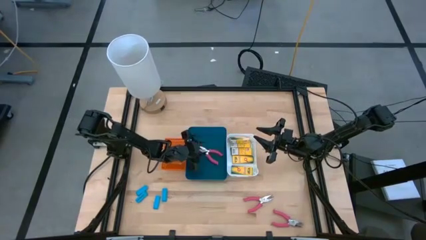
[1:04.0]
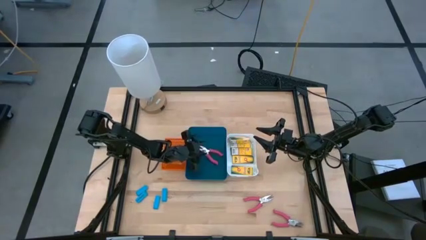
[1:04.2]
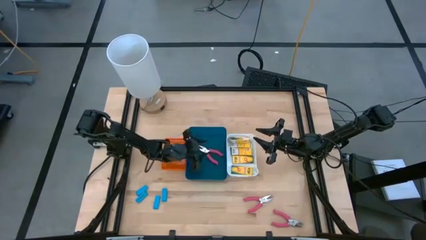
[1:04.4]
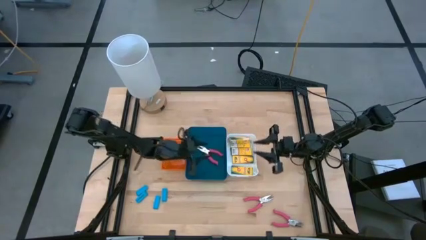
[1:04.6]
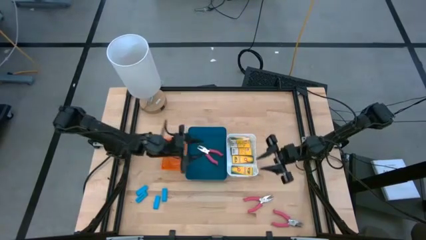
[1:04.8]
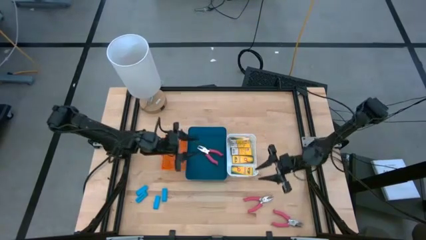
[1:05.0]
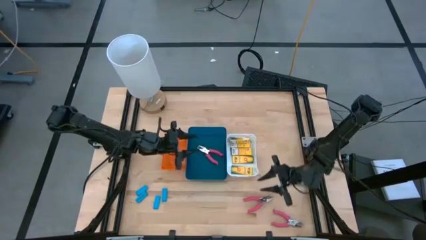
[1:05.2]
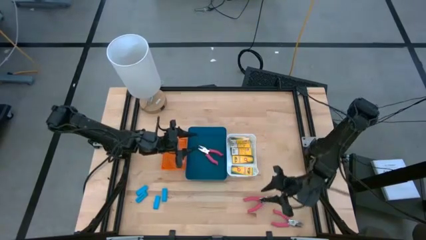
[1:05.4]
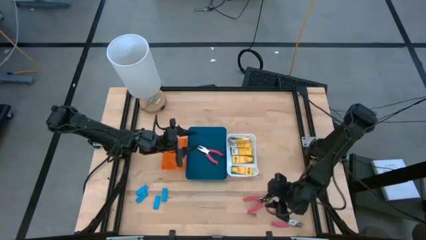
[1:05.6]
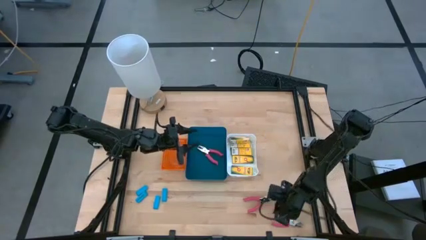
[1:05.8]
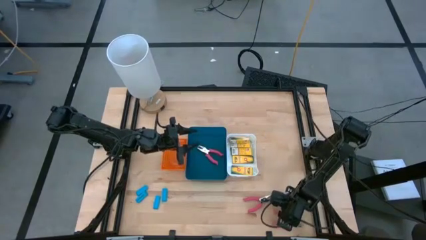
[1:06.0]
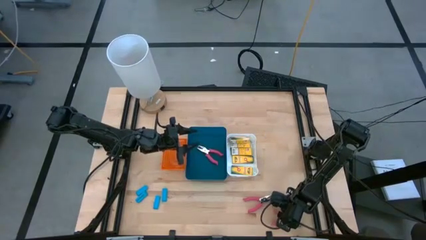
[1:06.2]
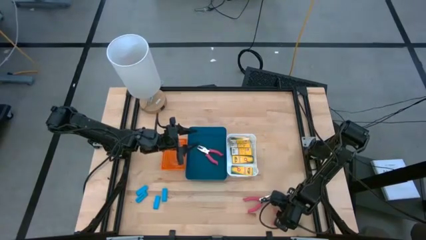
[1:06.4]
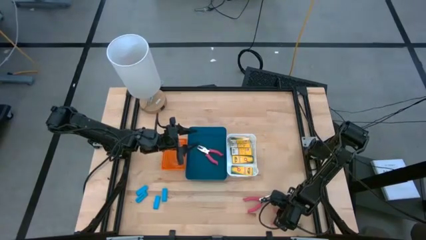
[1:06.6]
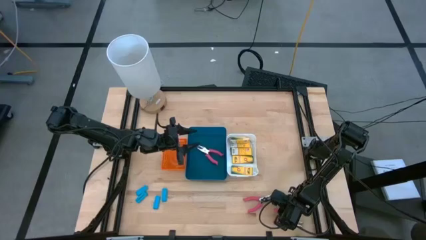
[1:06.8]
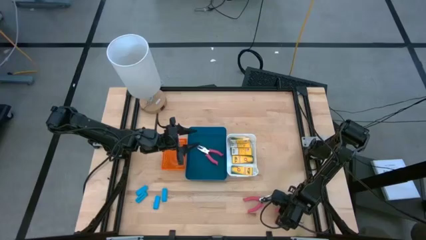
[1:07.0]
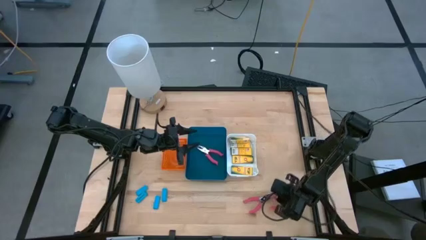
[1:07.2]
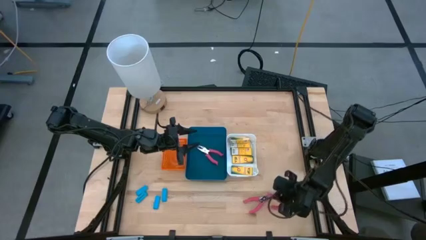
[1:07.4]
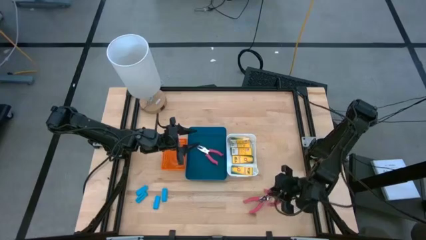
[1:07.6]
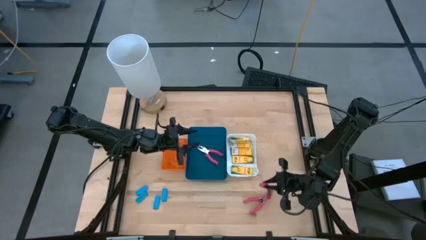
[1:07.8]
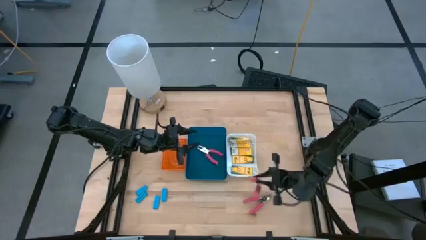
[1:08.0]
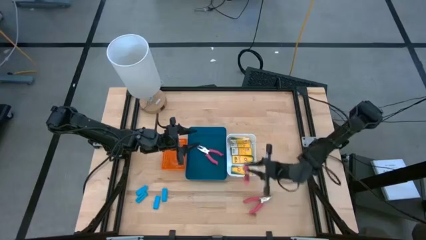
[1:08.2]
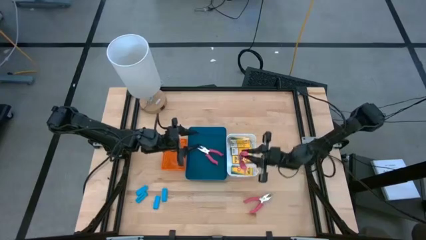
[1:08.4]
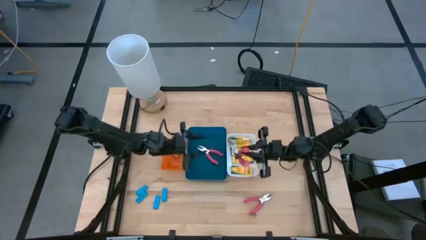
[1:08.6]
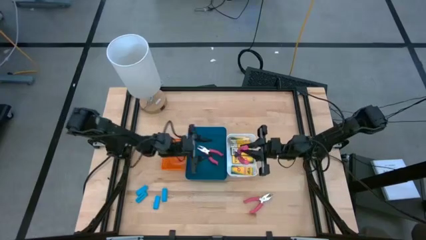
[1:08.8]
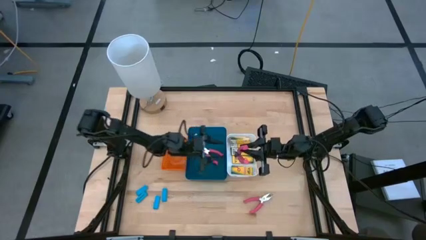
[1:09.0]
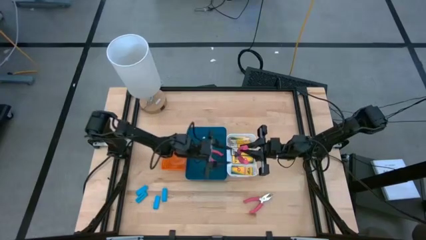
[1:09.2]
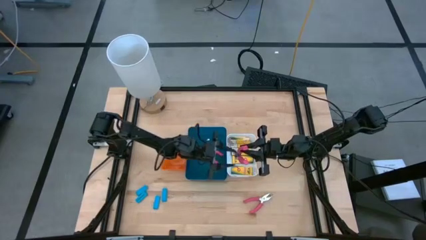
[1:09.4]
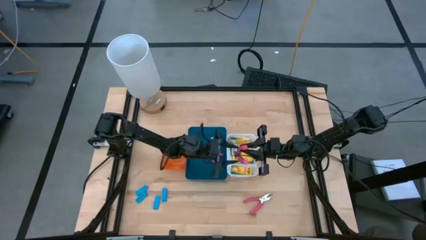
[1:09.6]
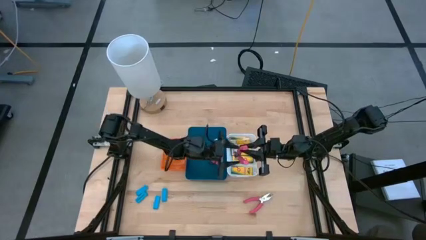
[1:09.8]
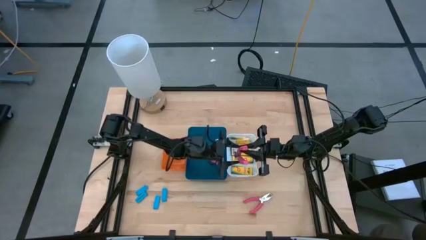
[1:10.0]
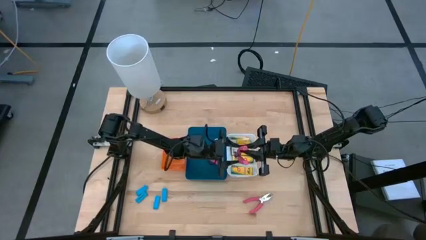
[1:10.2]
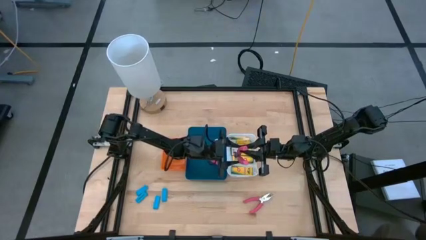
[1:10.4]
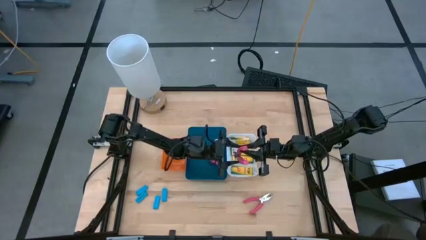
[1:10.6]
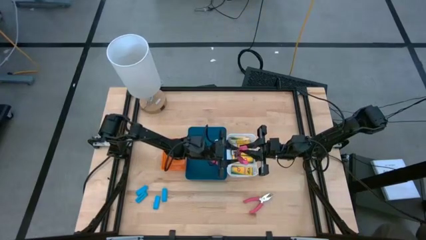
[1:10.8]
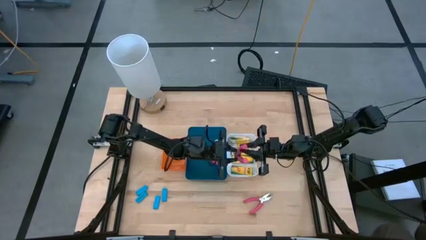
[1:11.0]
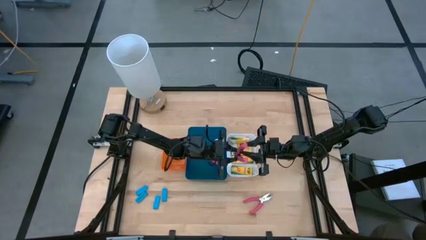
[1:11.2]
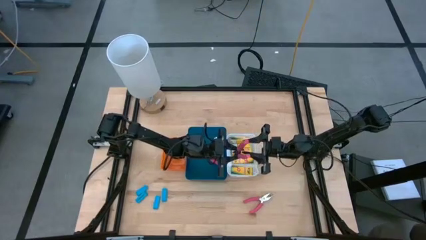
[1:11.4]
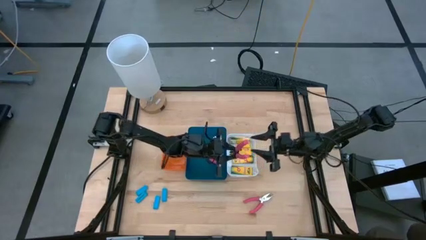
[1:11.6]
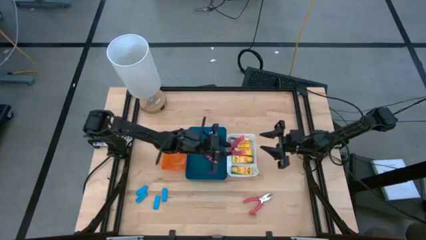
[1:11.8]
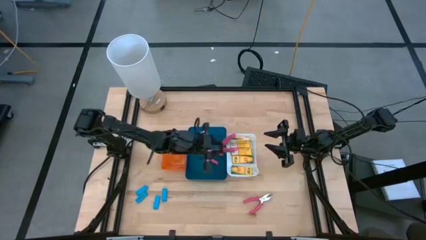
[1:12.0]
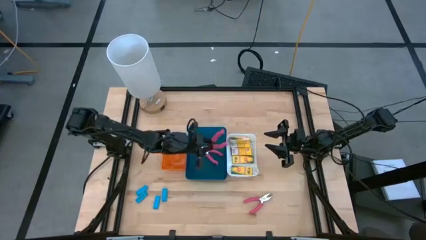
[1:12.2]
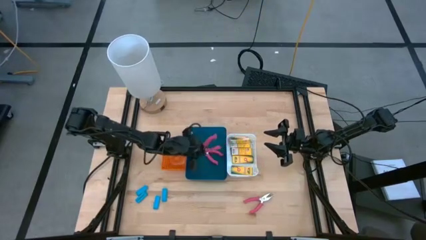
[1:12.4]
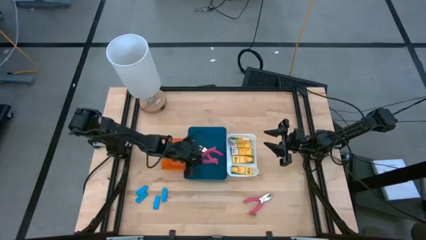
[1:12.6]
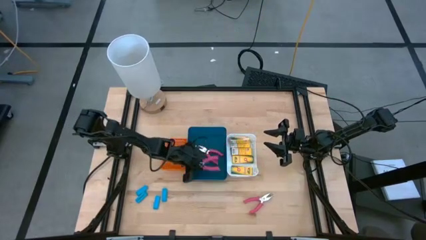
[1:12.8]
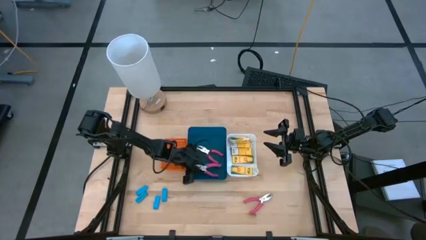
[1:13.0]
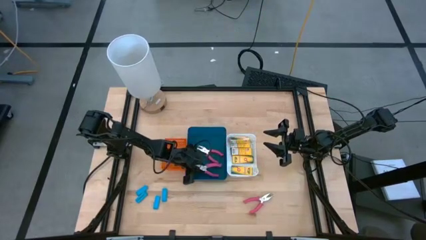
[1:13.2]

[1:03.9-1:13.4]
Task: Pick & Place School Supplies
Put the pink hole puncher into the blue bin

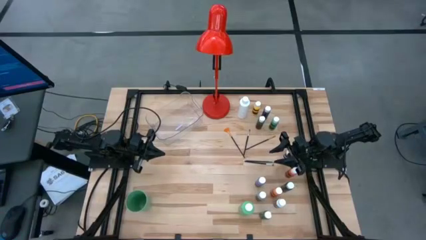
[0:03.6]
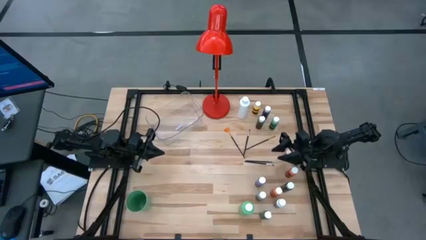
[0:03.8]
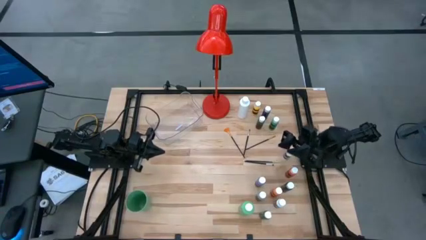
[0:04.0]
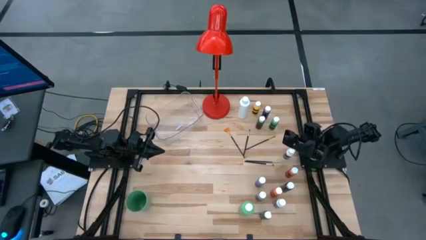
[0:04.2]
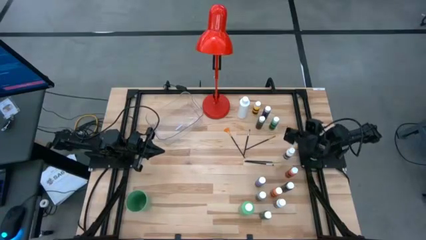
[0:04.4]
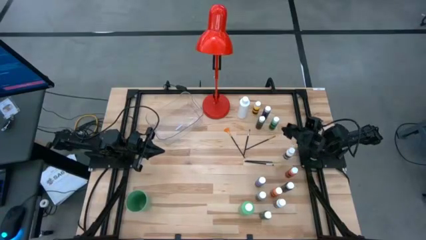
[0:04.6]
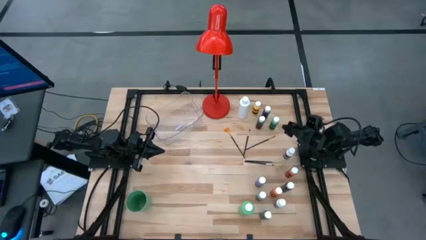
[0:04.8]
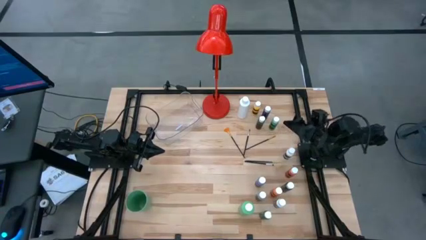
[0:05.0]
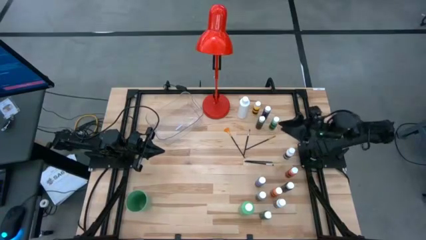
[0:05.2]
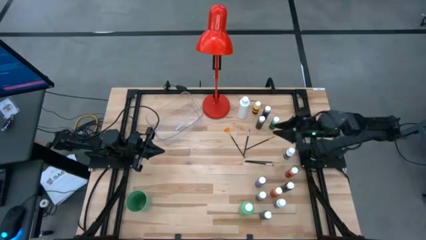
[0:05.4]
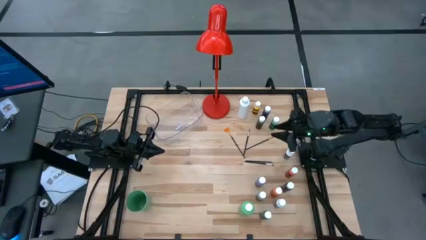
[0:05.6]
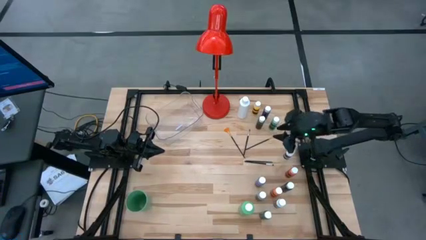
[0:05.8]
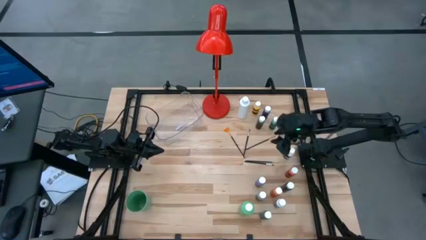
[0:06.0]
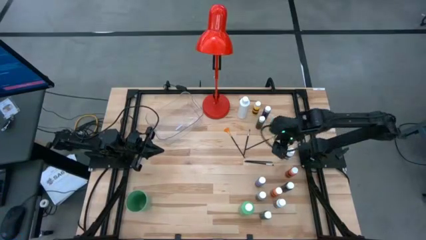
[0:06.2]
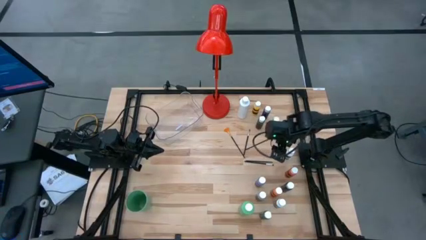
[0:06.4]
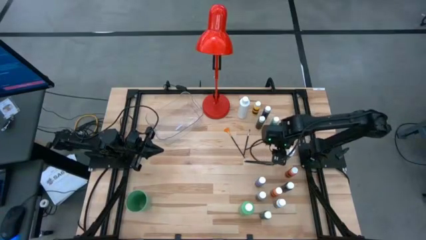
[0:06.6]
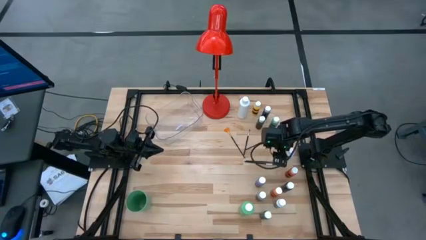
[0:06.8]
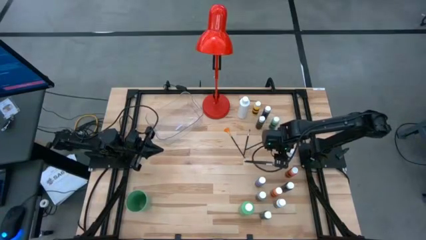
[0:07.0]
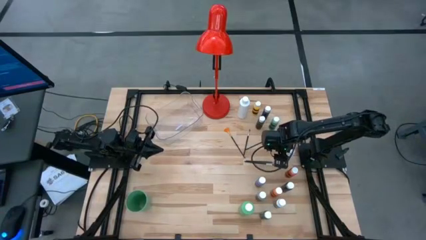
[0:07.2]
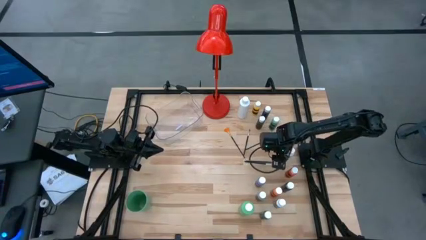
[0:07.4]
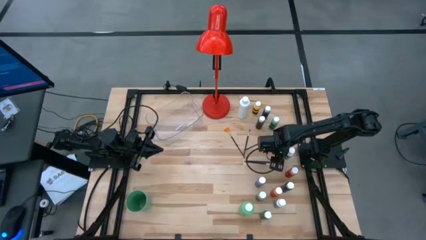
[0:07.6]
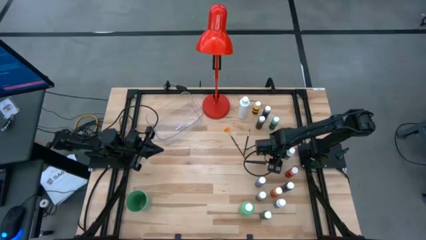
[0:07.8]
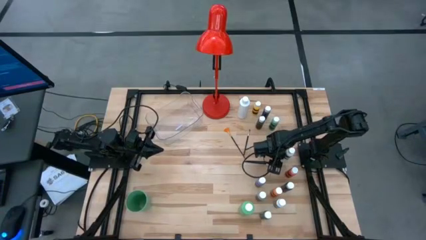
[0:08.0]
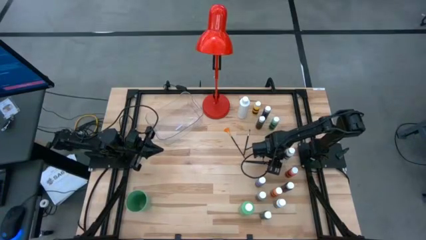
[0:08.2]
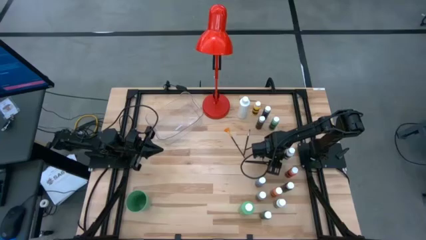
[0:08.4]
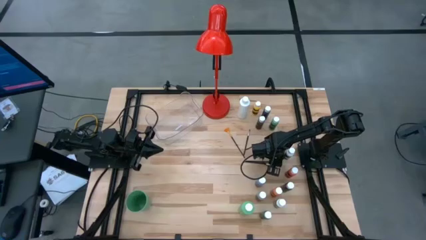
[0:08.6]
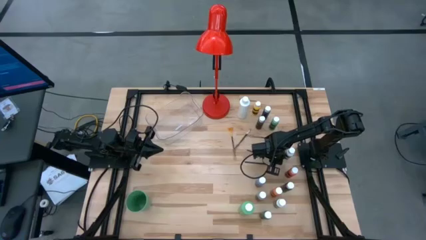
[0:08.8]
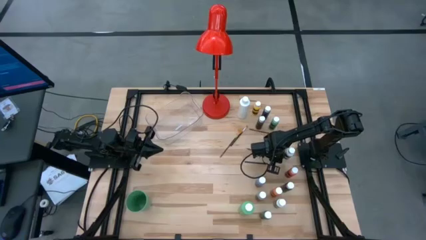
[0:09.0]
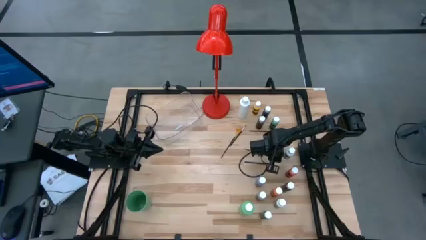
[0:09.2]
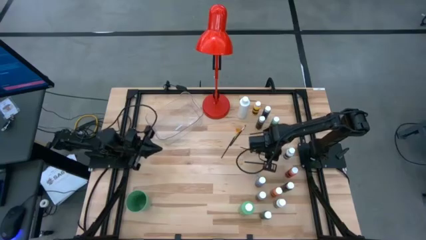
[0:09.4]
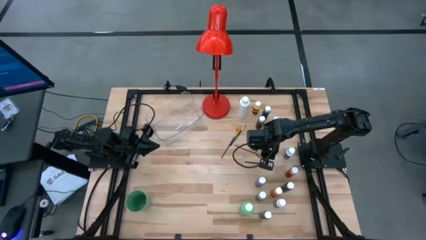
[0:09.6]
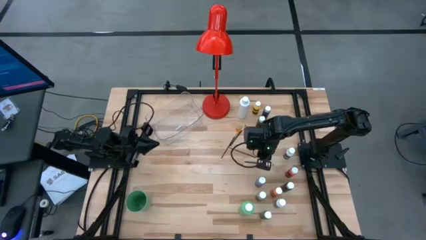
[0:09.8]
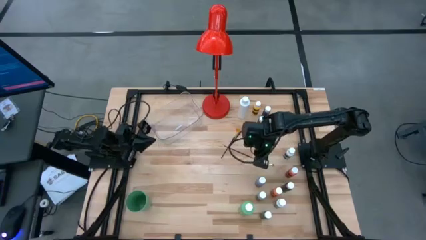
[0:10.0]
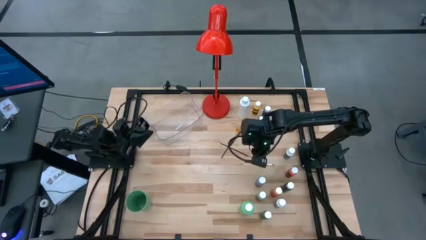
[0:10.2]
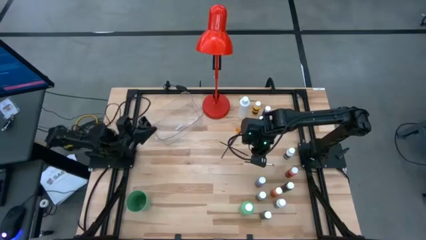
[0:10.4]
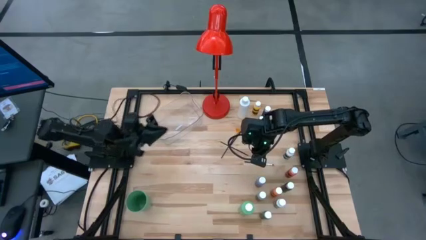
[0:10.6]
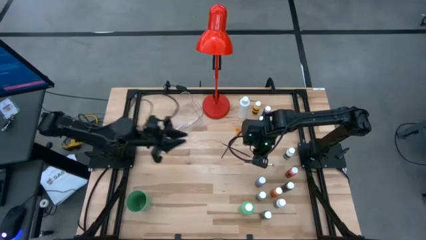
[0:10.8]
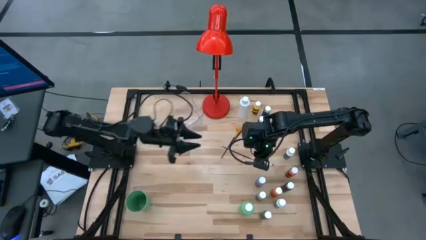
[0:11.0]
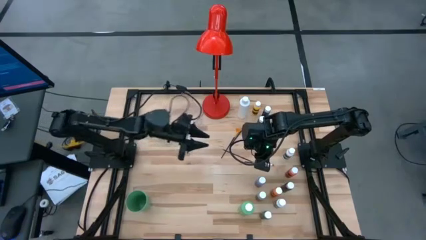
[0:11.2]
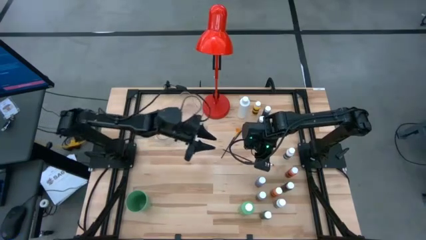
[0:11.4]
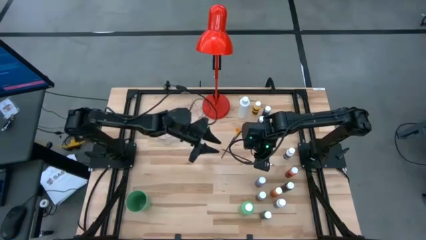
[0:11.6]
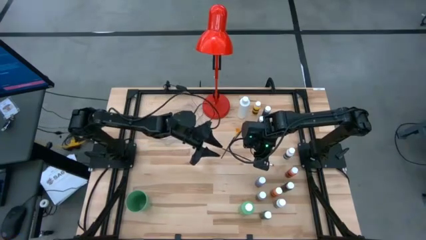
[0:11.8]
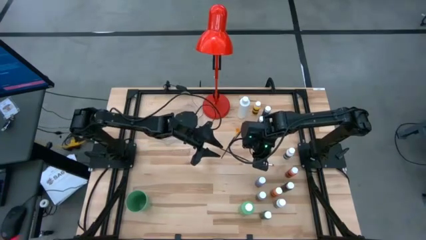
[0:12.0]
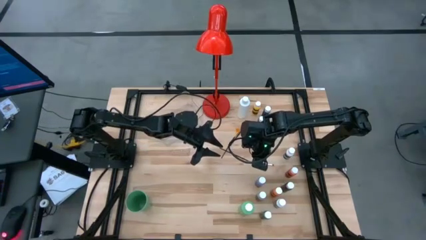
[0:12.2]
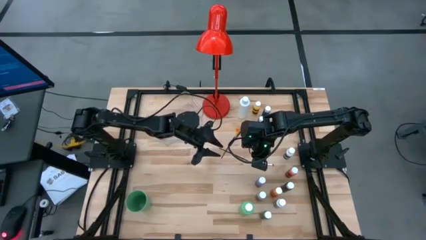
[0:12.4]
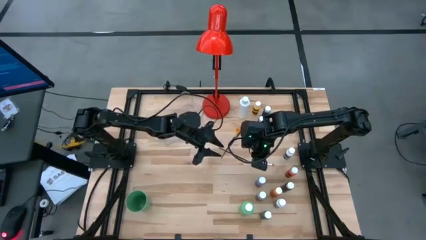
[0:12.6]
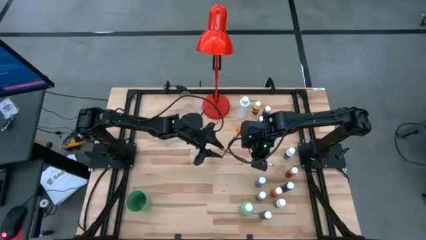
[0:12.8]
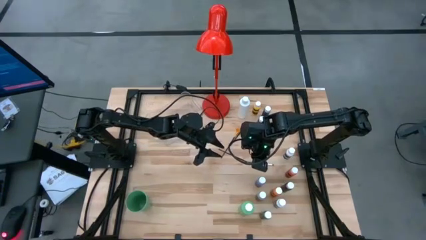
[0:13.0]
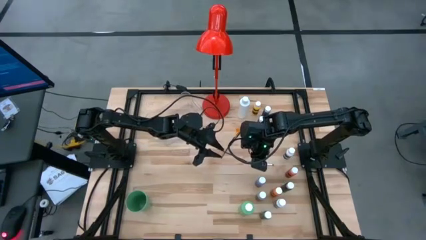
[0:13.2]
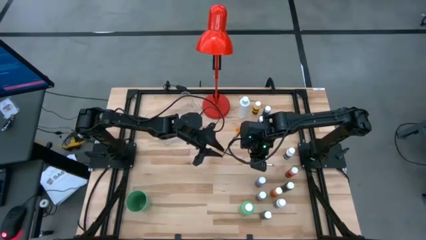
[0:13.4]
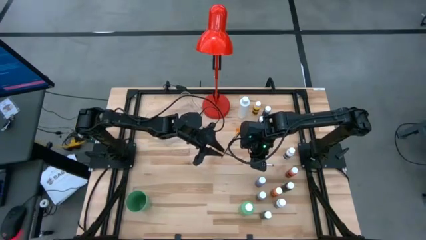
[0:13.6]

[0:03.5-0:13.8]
Task: Pick & Place Paint Supplies
Put the black paintbrush into the green cup
